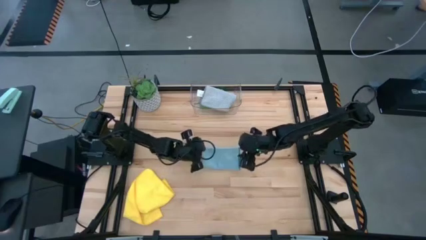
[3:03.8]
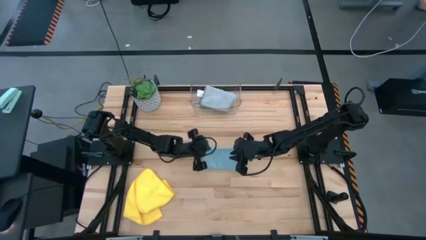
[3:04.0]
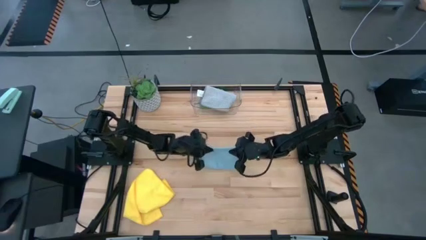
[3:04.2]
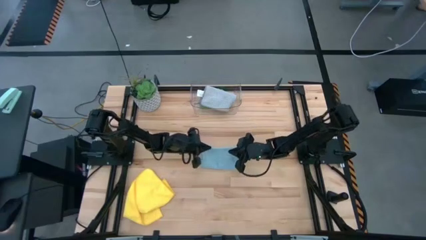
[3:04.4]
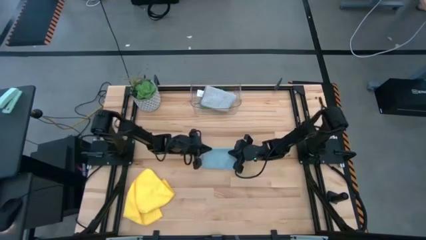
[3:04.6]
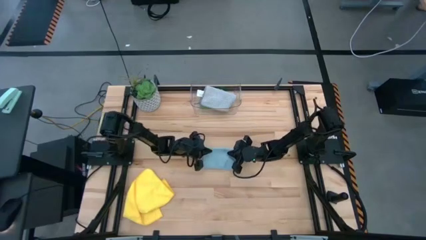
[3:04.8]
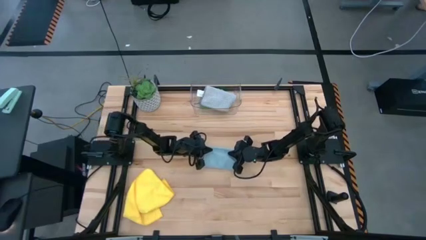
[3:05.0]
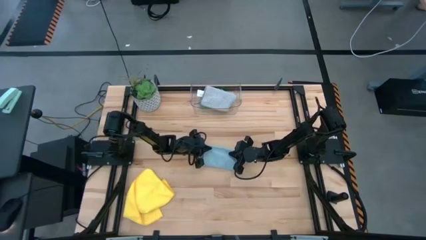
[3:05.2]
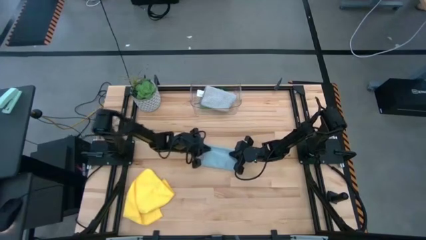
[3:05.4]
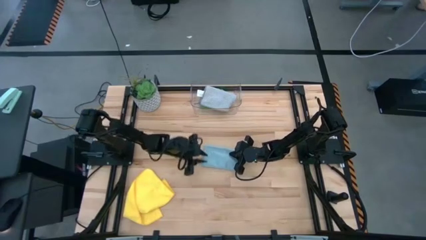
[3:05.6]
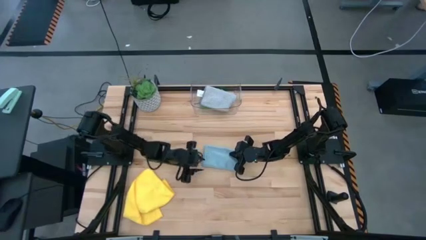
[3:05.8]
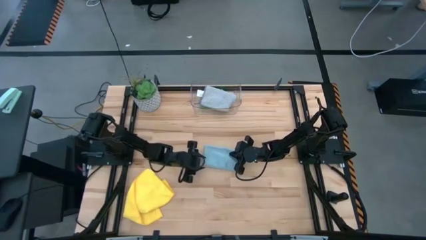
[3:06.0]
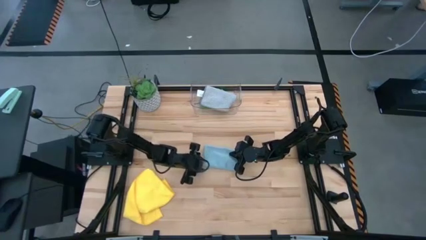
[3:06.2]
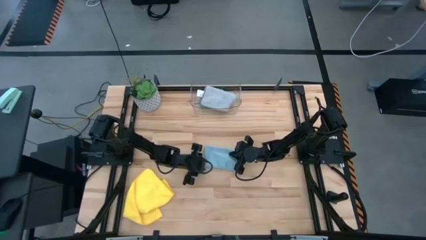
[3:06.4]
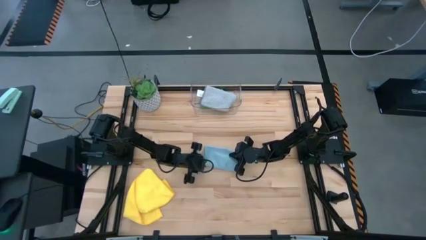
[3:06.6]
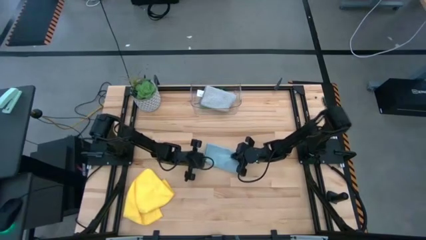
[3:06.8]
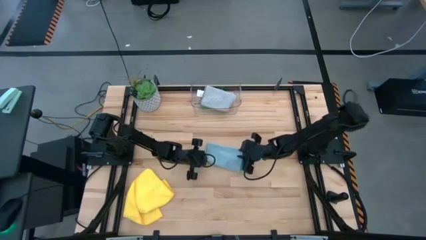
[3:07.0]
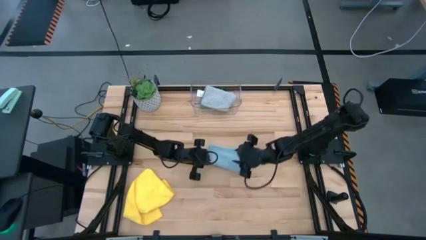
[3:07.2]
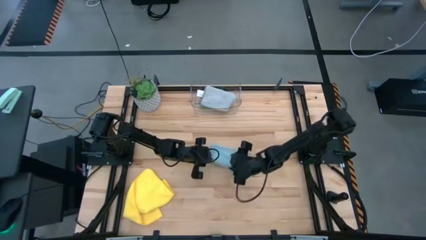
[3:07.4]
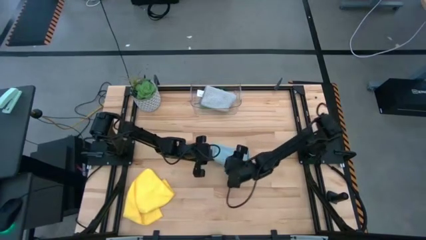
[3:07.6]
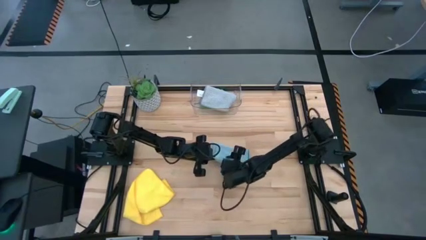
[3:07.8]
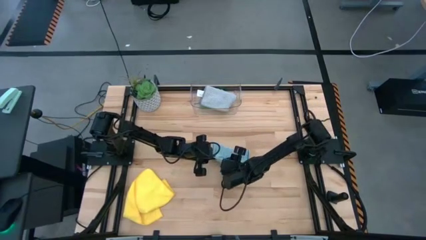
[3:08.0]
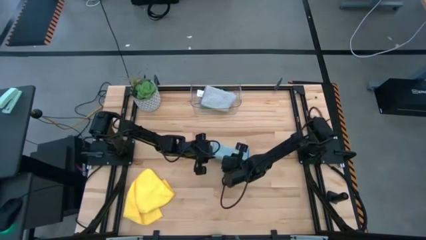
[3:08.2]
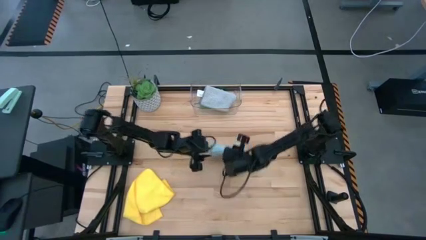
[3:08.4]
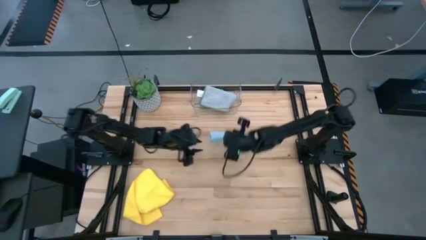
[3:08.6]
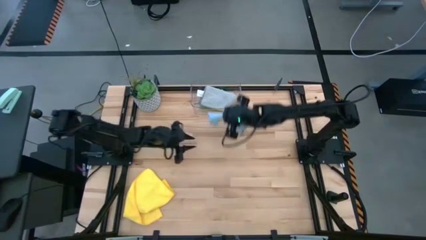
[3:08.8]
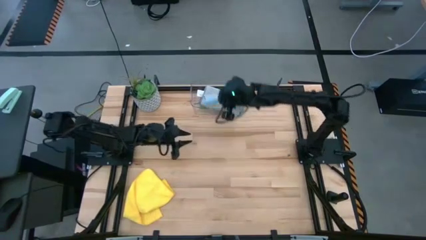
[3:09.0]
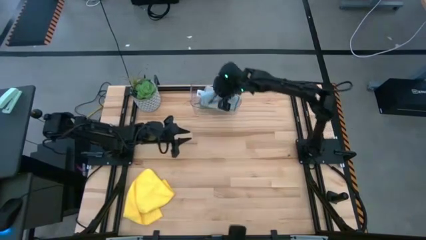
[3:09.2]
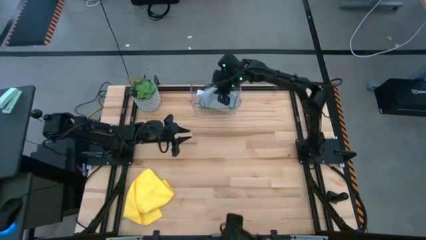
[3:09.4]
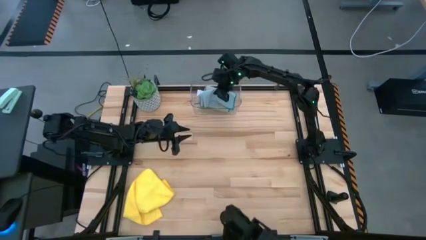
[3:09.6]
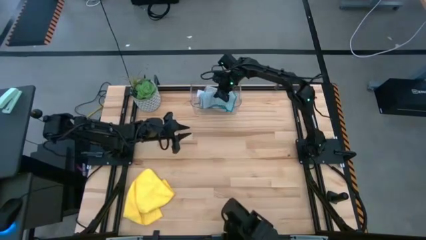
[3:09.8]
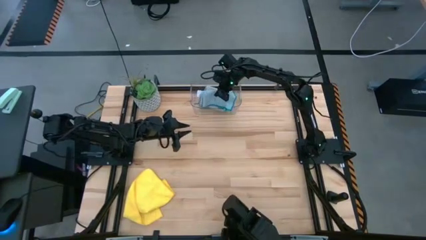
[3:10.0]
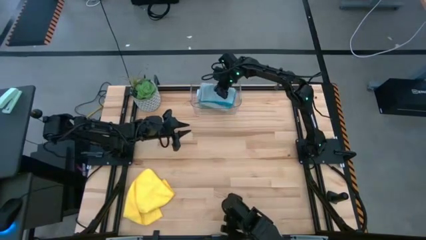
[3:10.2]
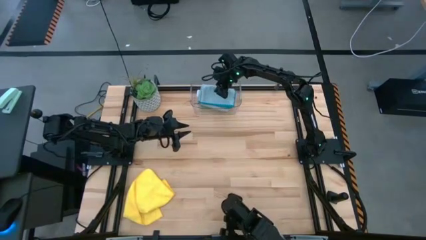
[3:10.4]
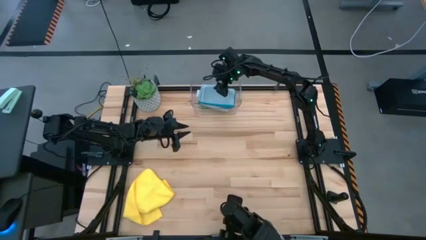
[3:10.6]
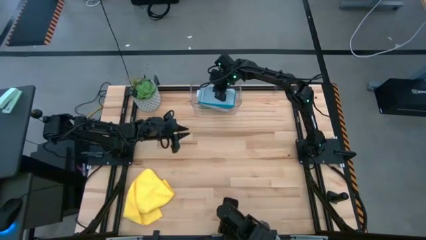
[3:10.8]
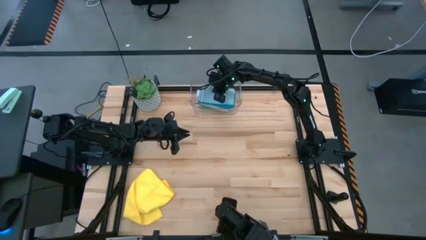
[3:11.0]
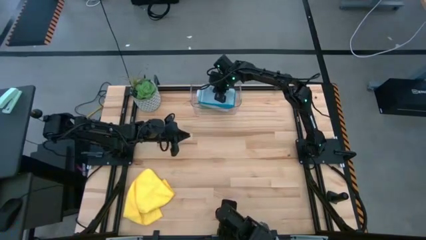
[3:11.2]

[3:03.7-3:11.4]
Task: Fold microfiber towels
Stack the folded blue microfiber cloth on top of the gray microfiber cloth

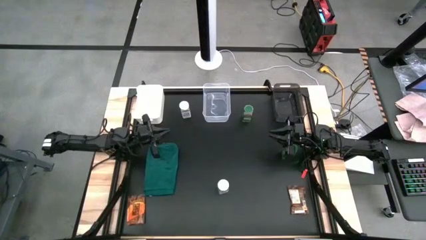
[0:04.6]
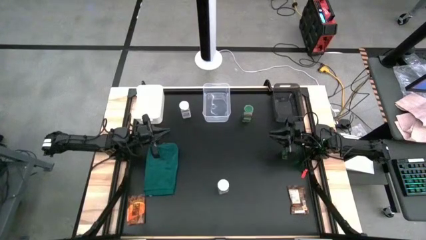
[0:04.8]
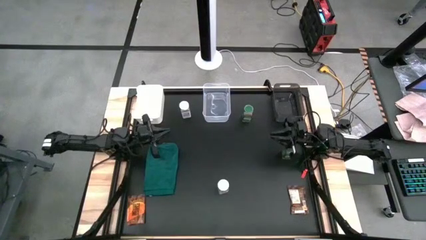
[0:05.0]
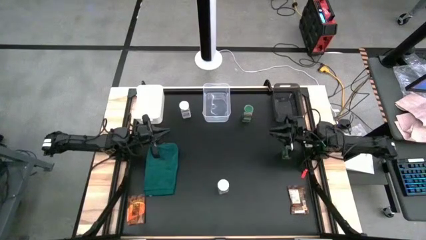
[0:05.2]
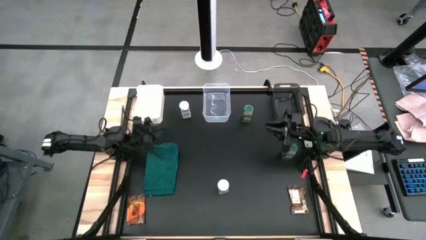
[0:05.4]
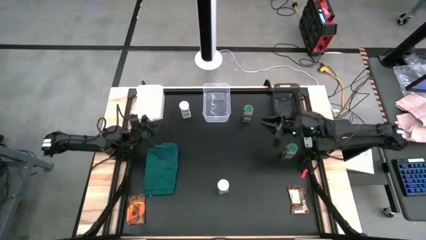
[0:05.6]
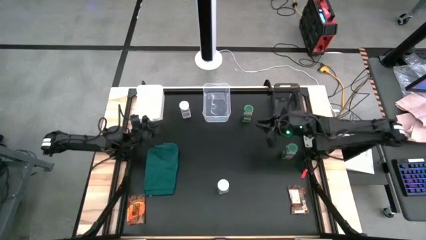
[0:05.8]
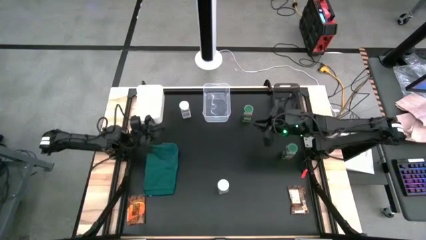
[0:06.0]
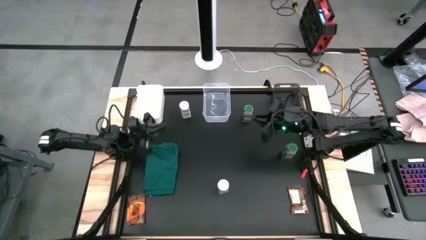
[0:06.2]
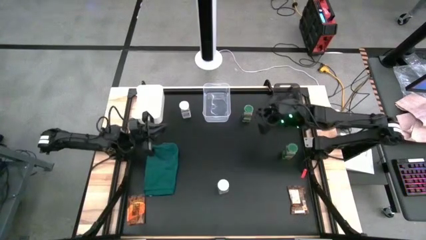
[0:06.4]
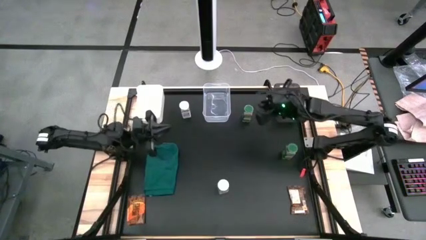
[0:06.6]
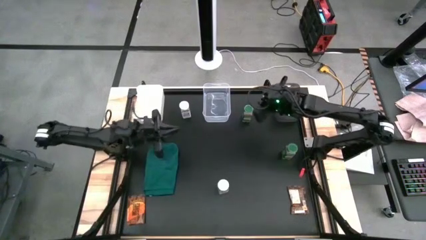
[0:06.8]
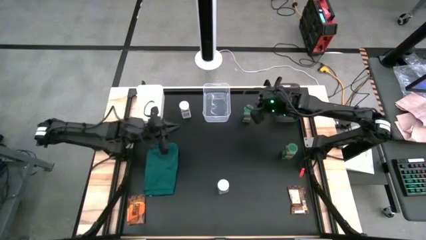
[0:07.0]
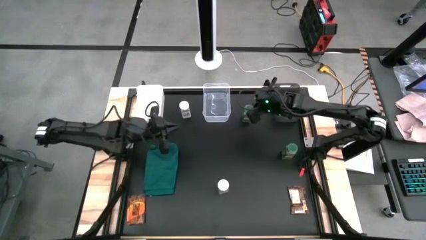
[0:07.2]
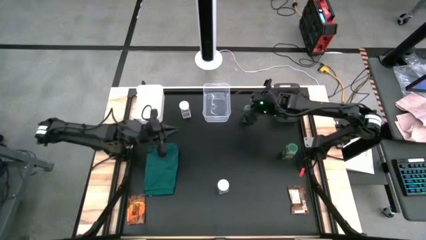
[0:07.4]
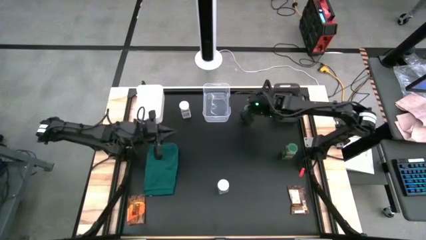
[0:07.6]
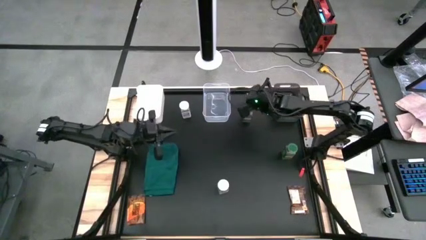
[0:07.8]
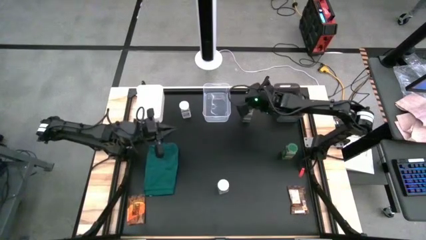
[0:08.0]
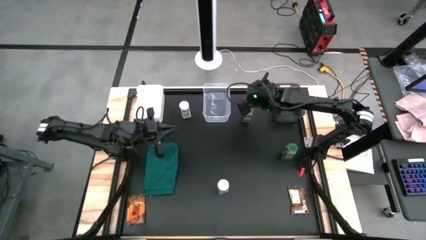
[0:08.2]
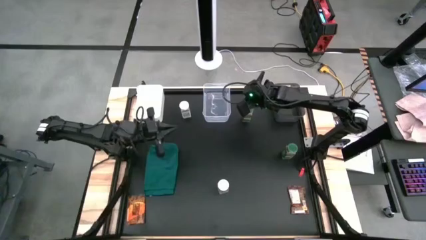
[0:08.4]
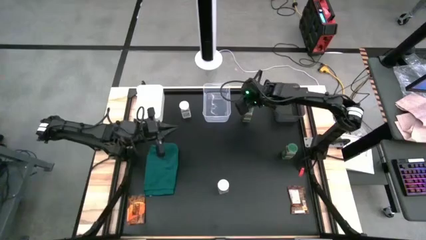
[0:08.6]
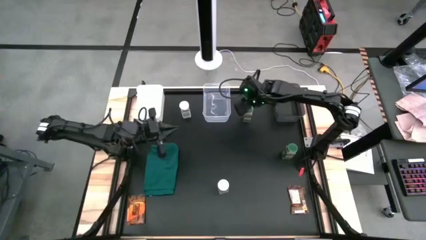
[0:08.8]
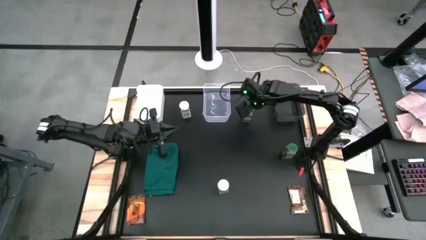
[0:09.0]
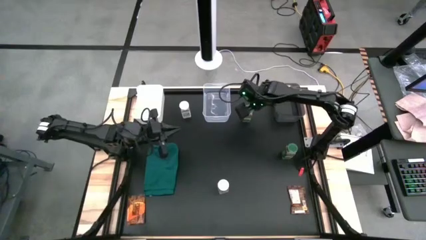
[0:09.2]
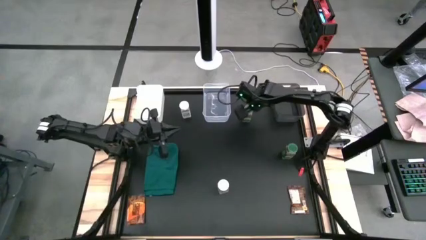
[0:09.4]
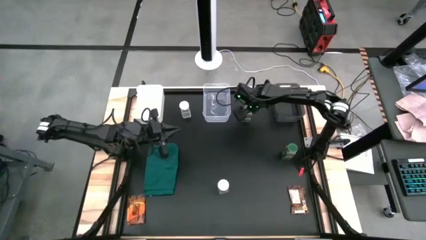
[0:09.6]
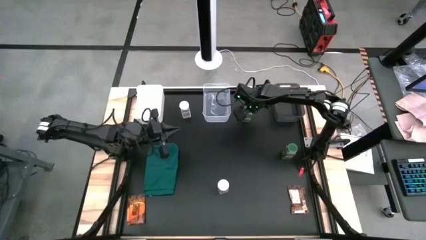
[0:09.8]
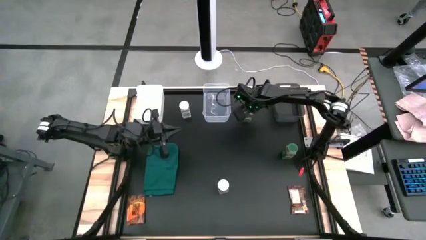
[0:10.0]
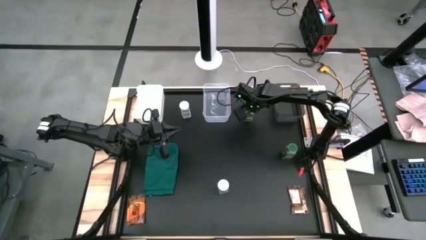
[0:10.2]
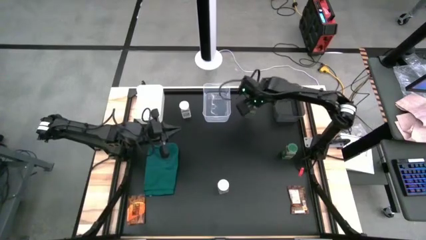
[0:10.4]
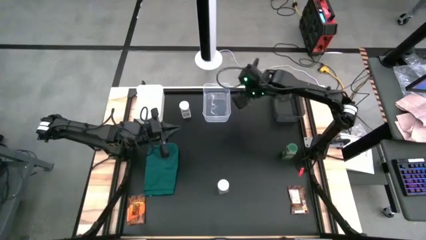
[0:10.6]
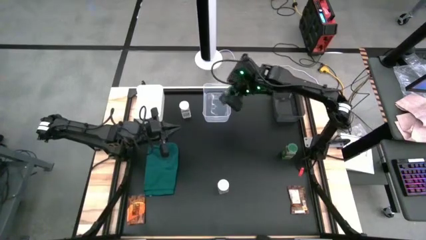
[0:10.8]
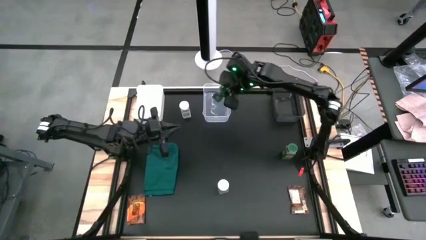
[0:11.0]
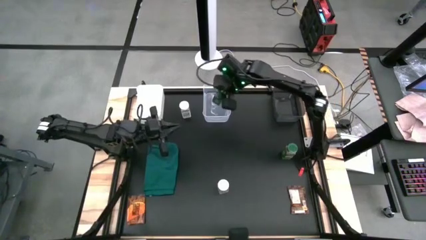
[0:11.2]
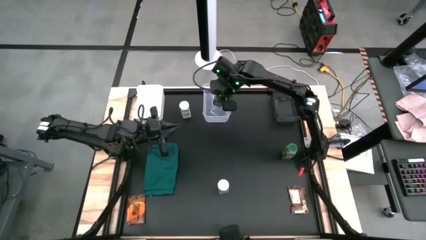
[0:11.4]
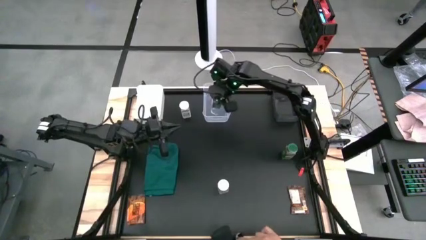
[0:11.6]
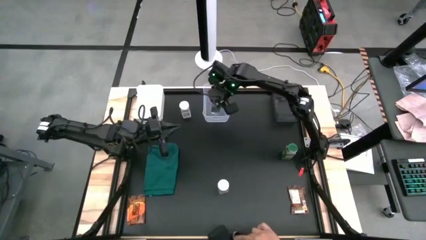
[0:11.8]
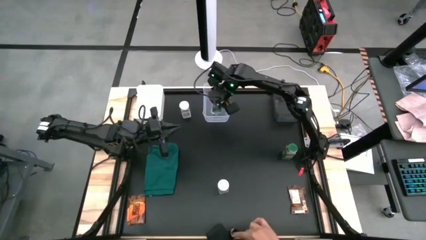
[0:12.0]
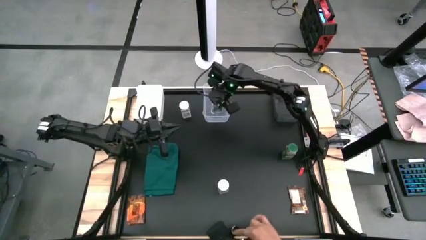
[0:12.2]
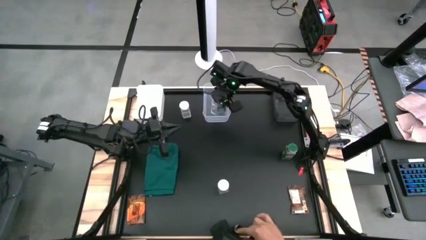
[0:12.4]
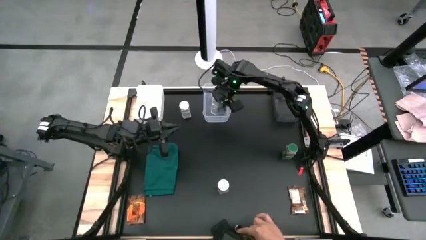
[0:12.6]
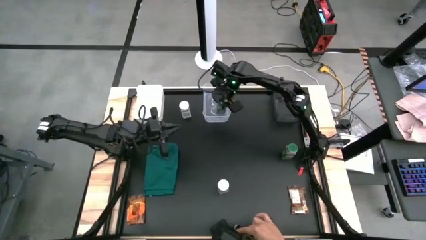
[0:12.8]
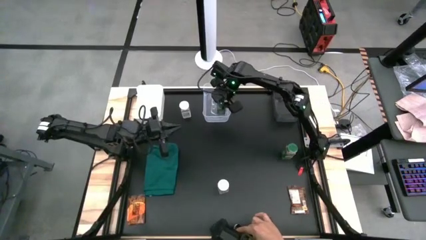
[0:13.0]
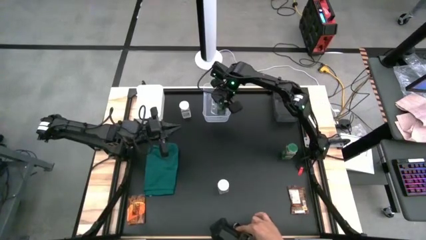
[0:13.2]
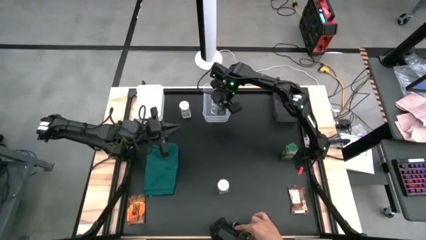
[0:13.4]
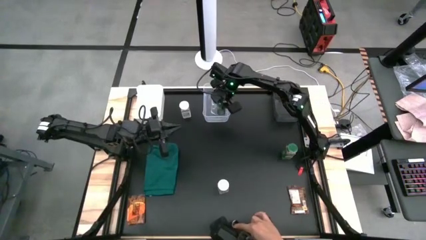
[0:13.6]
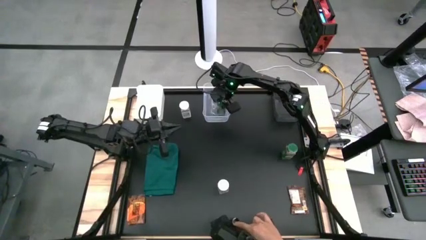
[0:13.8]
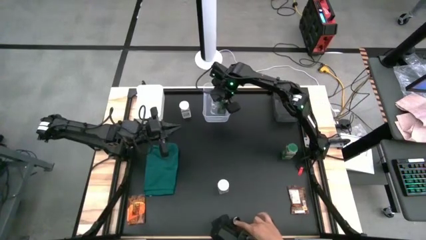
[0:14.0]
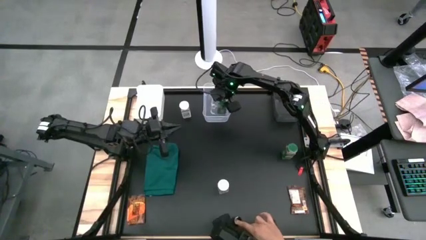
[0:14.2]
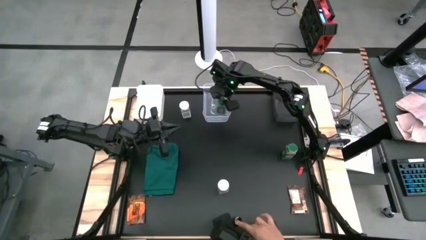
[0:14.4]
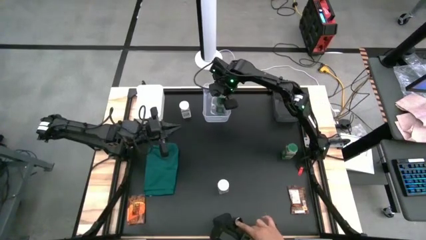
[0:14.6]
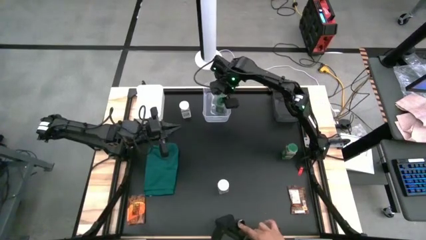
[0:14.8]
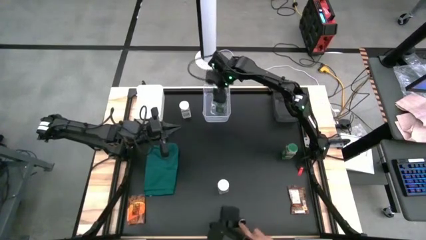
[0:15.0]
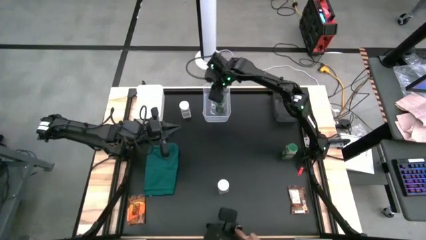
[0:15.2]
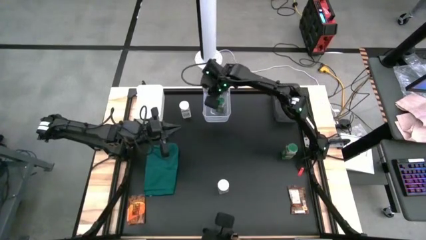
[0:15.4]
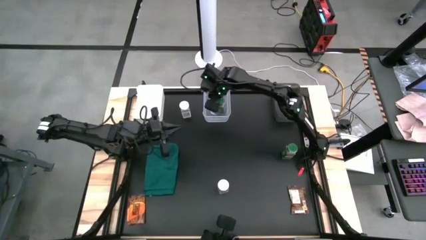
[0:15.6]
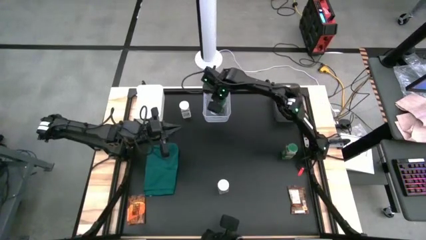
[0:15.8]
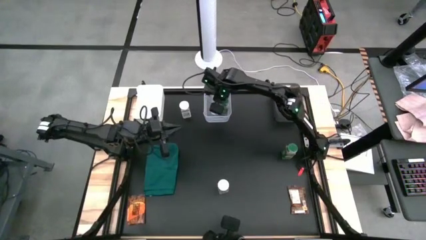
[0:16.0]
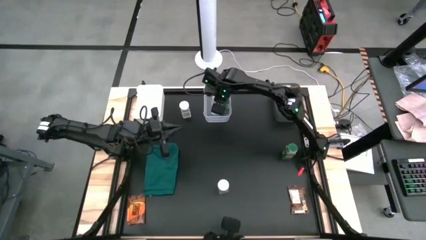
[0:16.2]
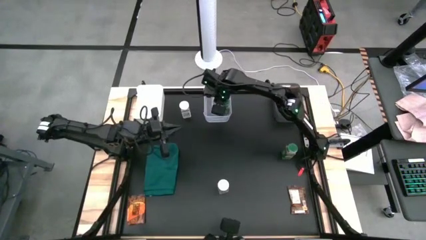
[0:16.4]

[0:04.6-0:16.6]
Task: Sort spices by type
Put the top green seasoning bottle into the transparent bin
